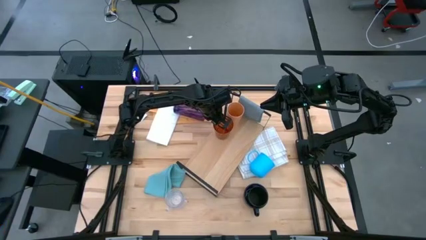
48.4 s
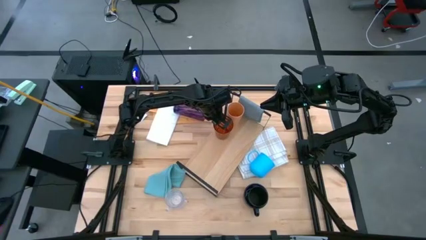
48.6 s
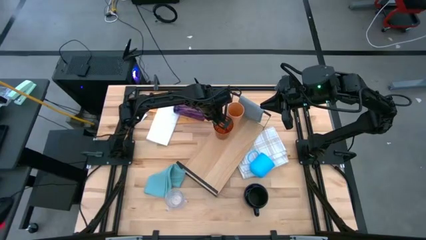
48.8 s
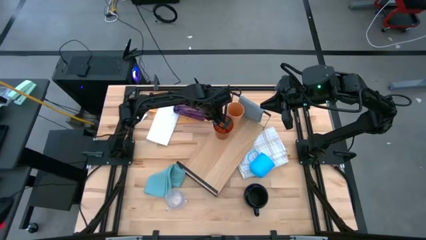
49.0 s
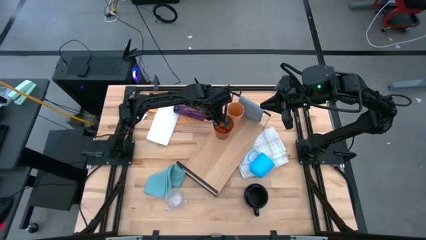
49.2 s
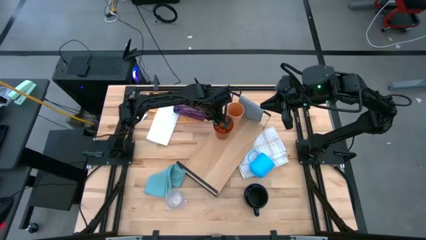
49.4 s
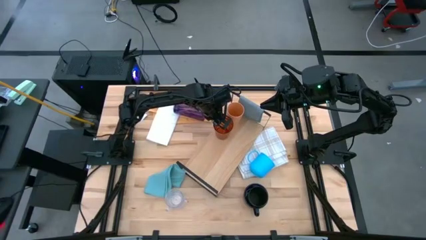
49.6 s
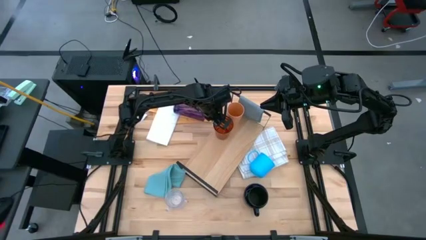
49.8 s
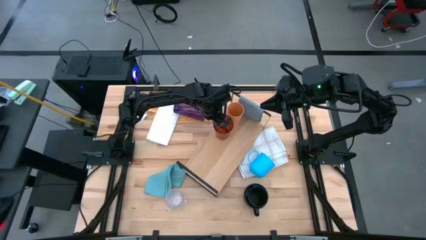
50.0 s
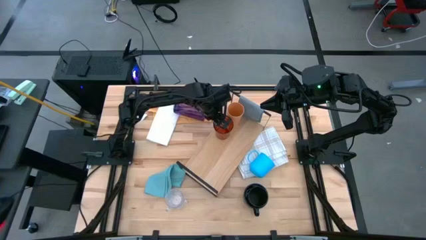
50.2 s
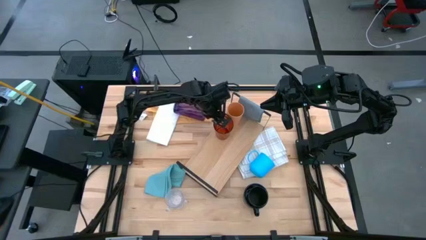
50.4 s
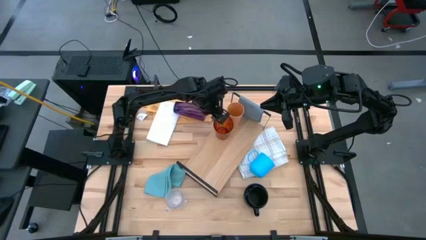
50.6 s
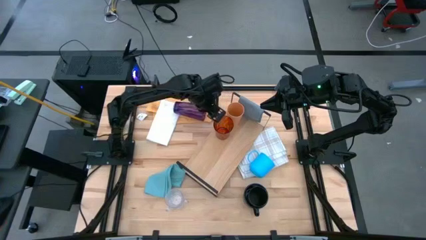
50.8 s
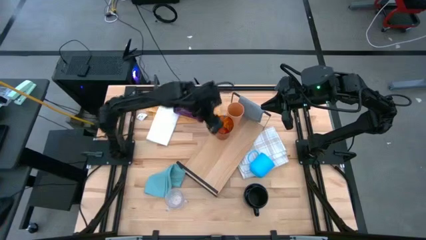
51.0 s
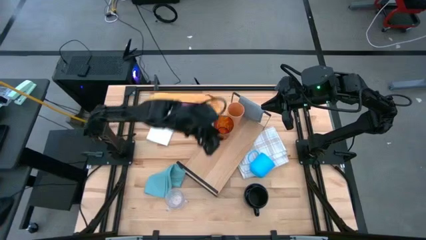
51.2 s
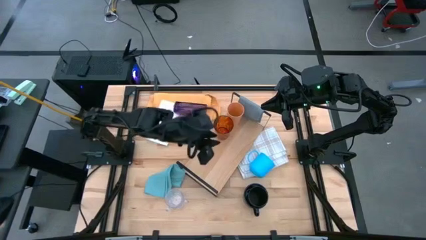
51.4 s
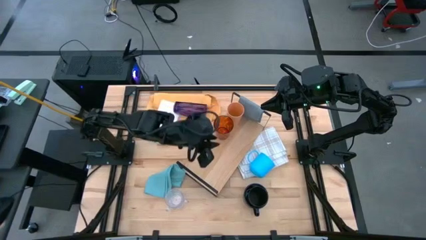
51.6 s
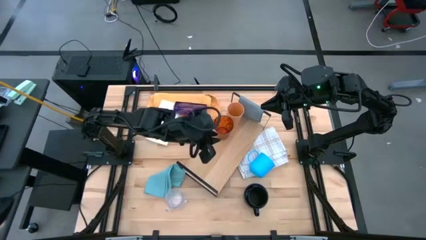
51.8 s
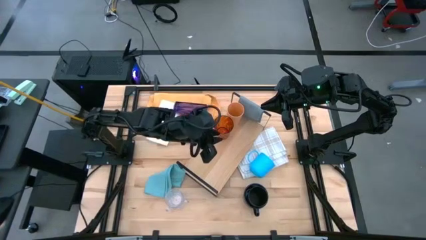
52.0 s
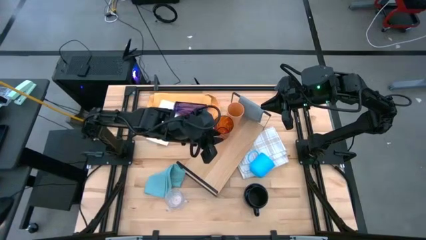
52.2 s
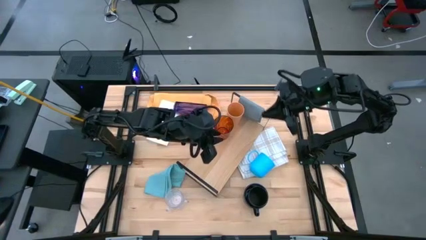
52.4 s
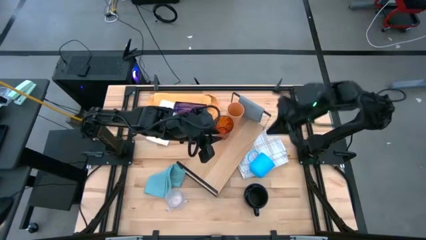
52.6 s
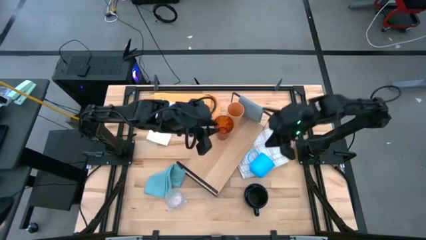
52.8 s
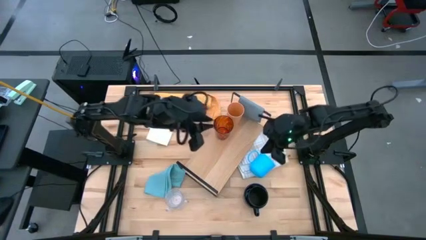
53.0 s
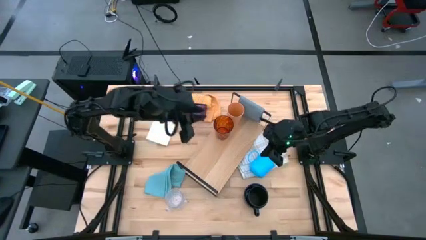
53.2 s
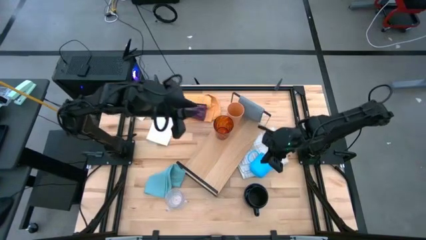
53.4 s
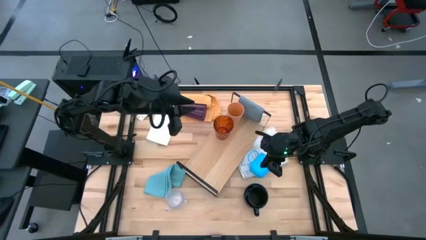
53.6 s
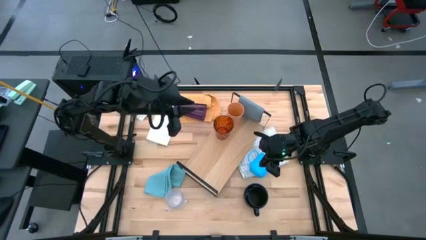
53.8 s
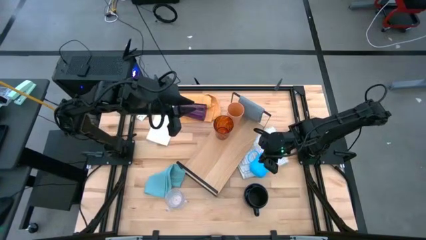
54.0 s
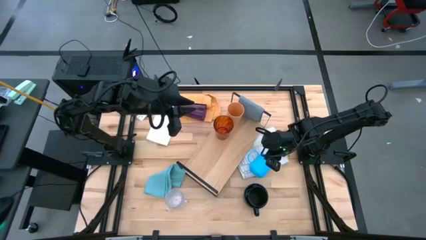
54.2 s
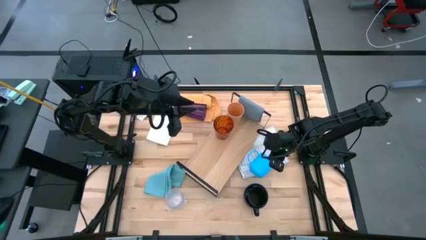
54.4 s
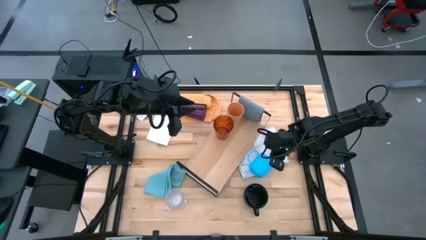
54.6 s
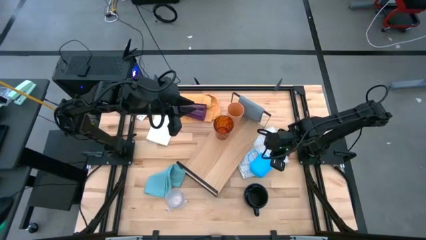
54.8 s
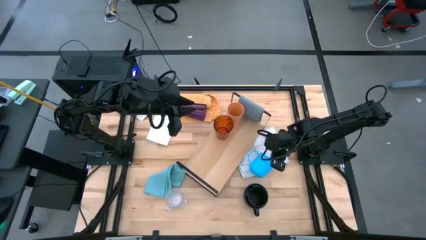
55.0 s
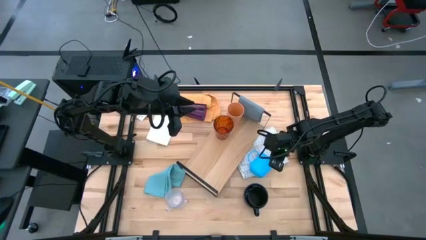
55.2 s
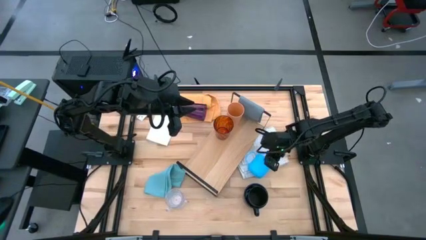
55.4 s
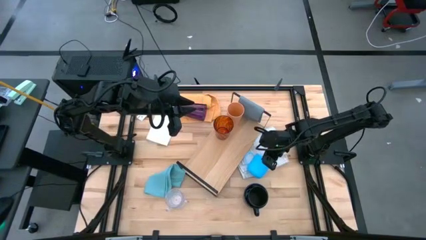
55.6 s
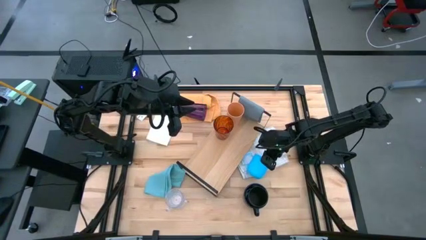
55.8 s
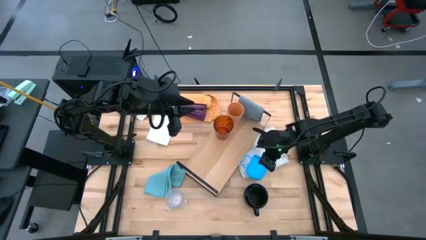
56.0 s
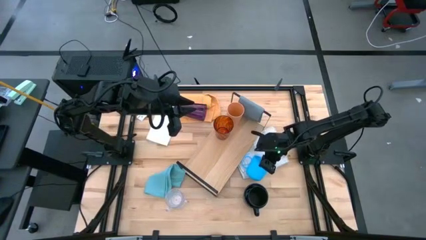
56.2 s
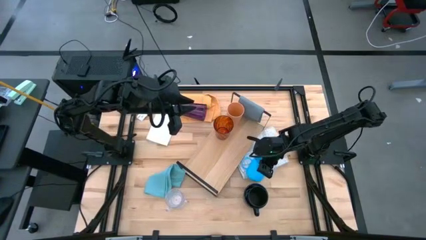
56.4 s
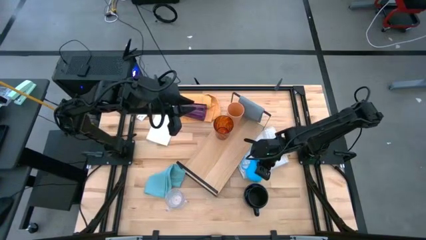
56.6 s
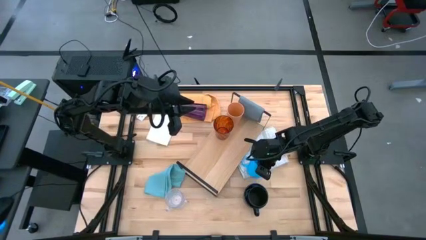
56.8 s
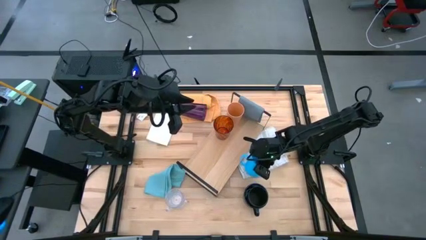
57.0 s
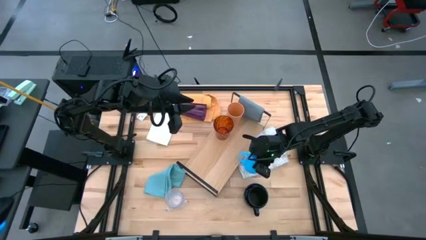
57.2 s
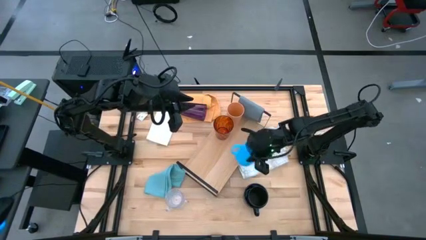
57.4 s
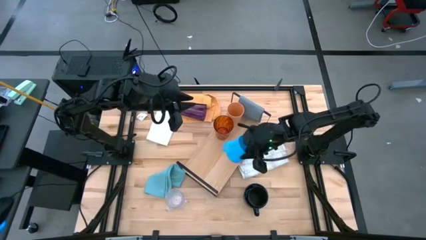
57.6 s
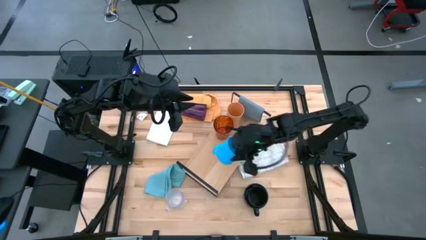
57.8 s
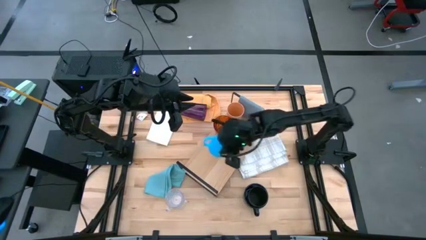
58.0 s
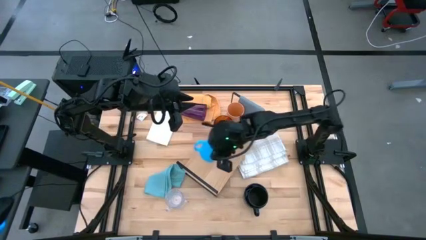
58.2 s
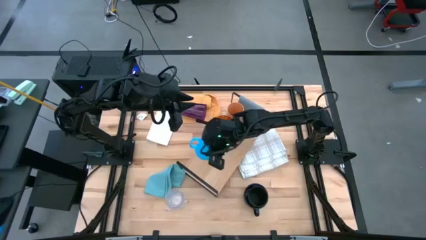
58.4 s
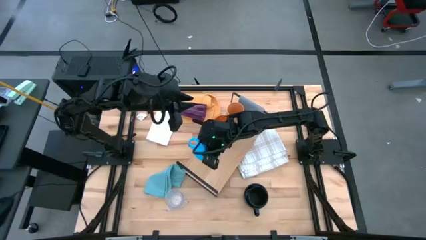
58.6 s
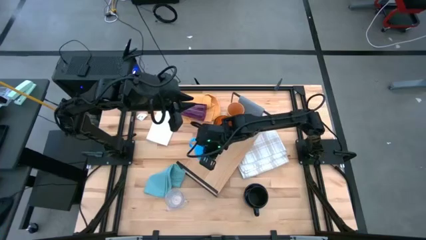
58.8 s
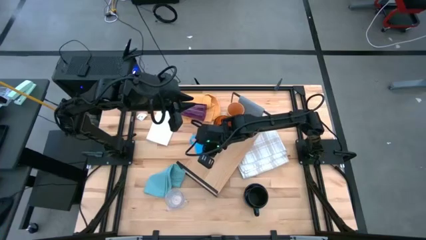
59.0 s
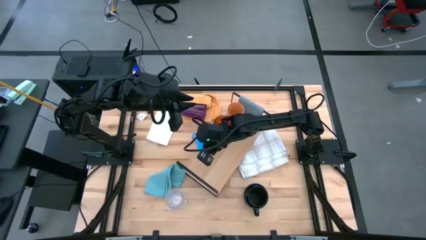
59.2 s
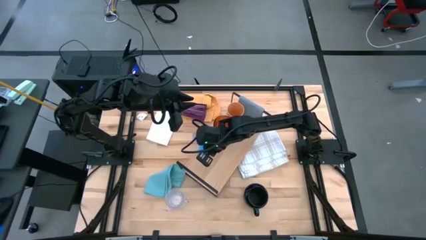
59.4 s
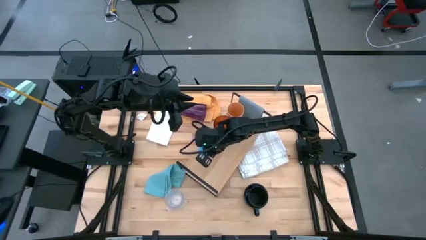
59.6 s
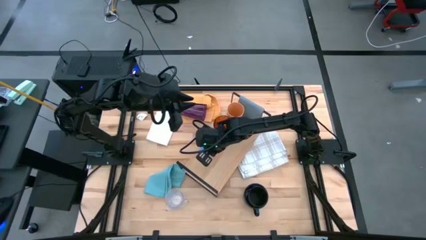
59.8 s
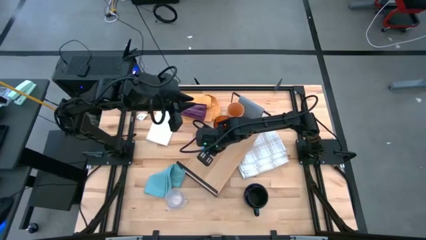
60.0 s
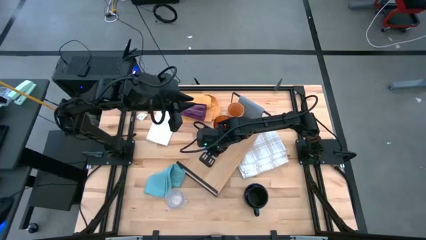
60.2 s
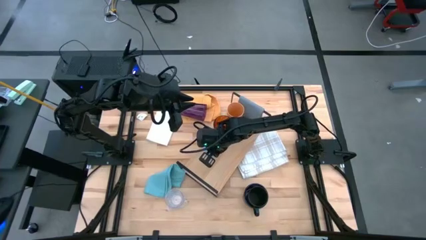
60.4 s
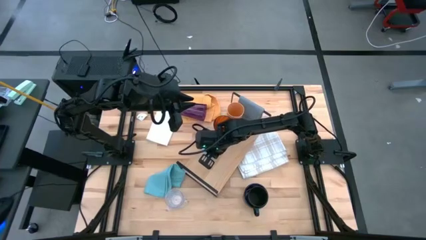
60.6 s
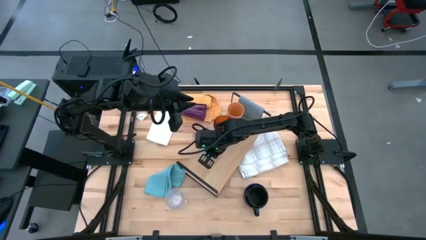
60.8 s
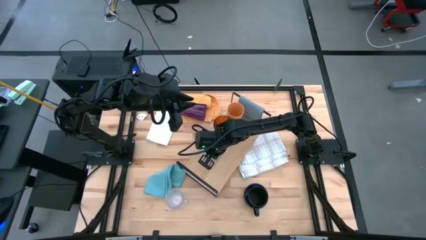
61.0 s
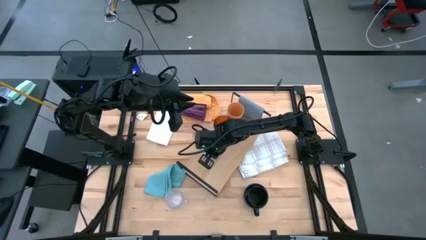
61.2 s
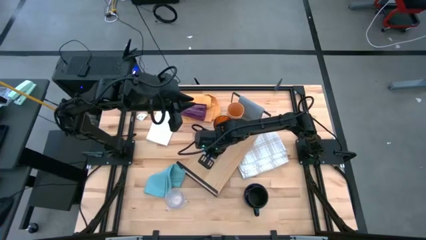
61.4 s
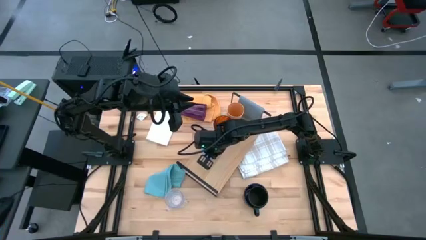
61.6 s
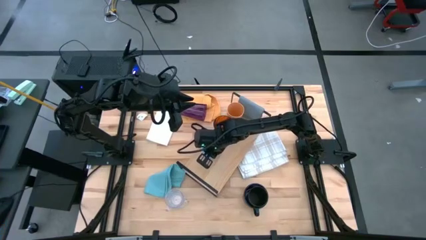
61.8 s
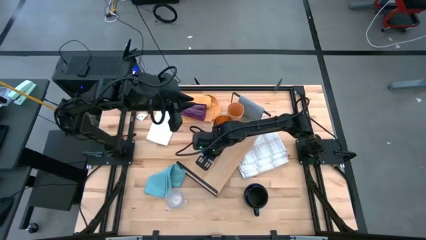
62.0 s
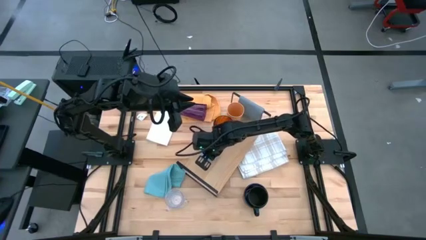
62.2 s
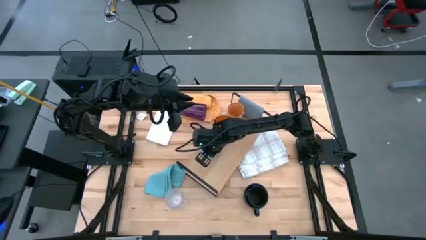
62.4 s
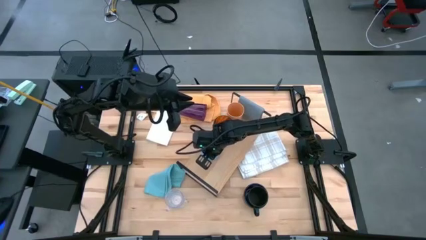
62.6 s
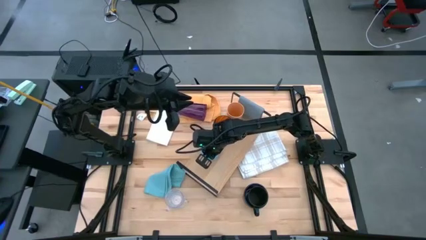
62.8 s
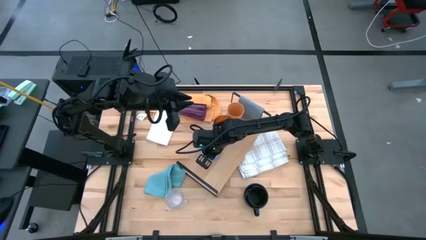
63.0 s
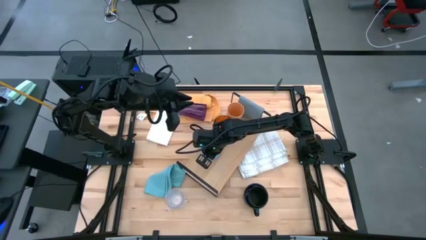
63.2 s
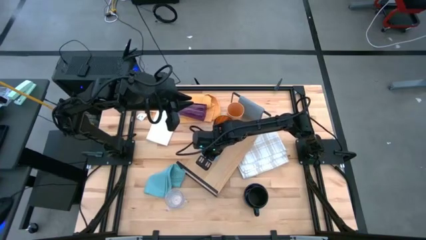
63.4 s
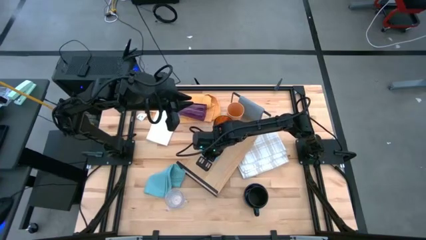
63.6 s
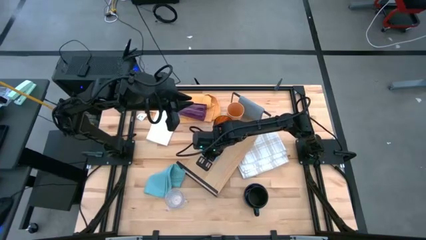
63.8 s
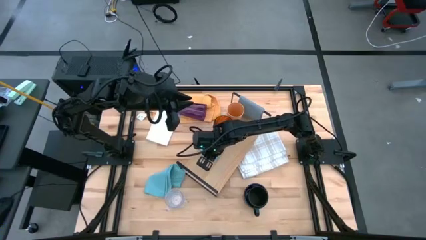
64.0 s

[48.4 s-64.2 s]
Task: Stack small to large cups/mugs on shelf
Put the blue mug on the shelf
